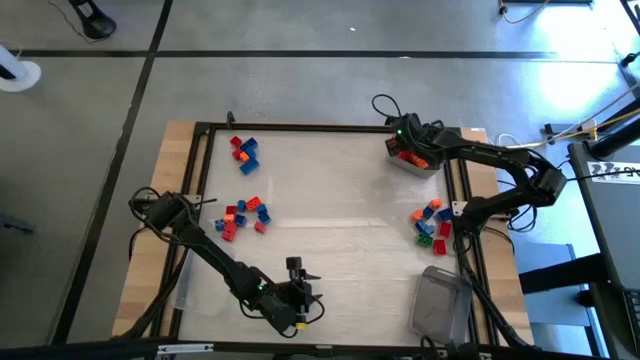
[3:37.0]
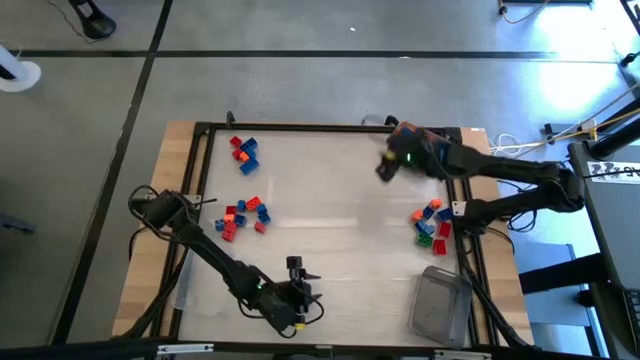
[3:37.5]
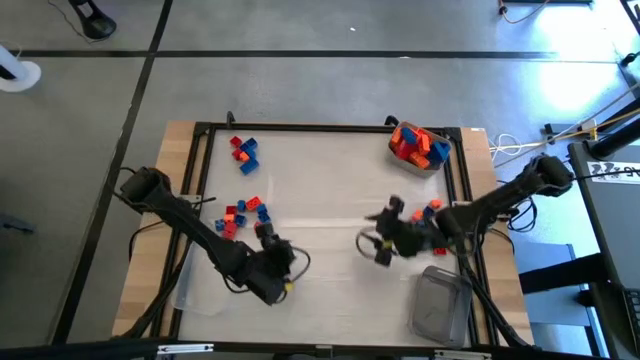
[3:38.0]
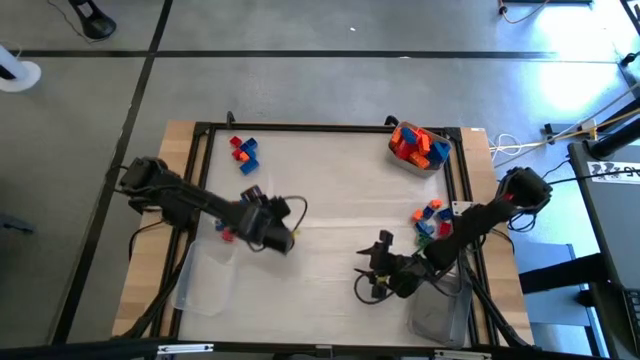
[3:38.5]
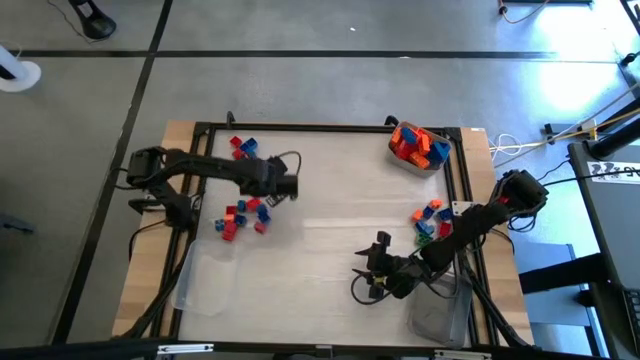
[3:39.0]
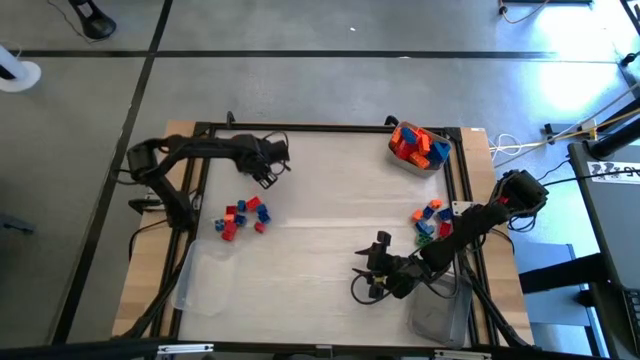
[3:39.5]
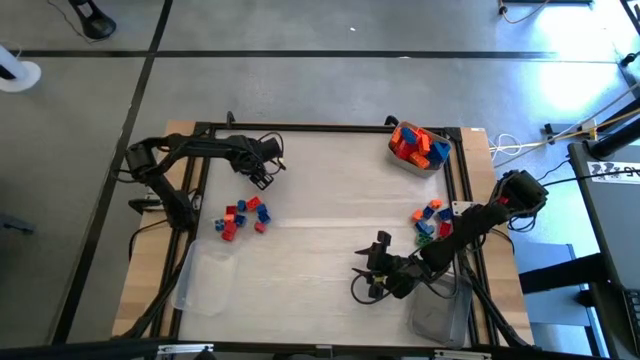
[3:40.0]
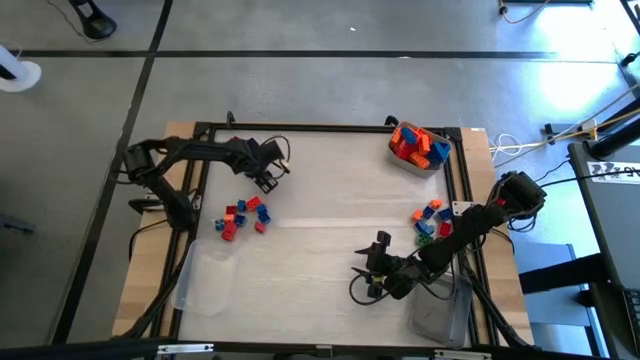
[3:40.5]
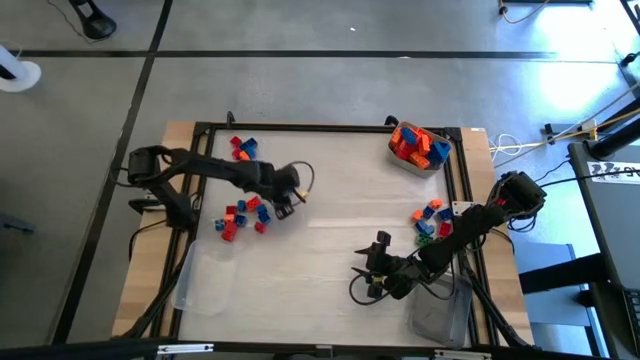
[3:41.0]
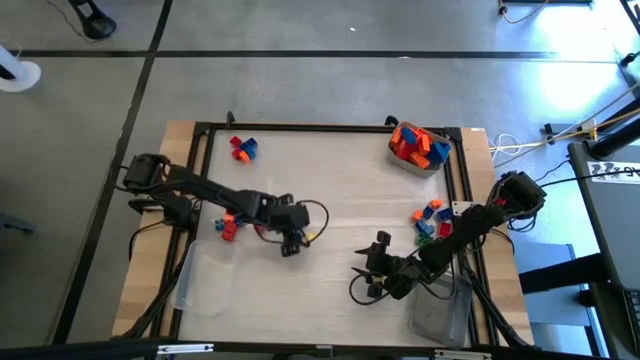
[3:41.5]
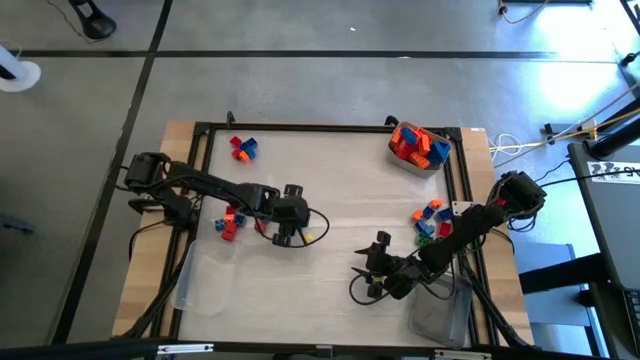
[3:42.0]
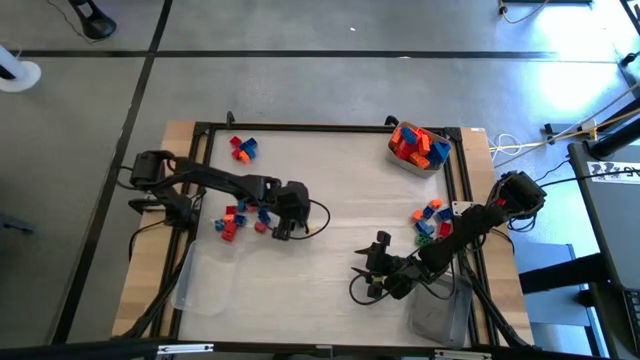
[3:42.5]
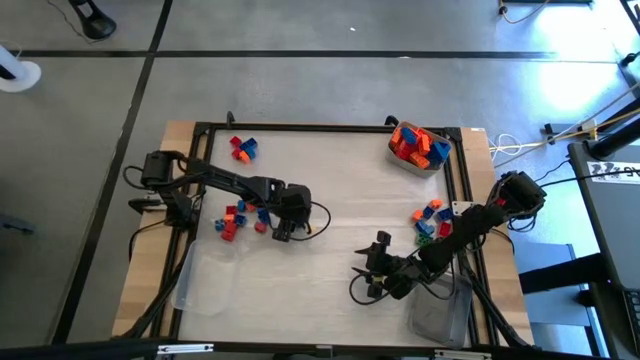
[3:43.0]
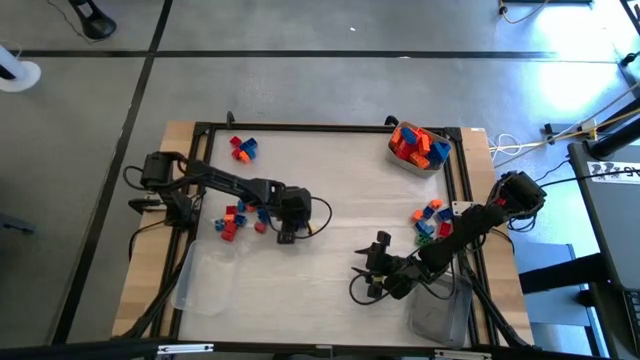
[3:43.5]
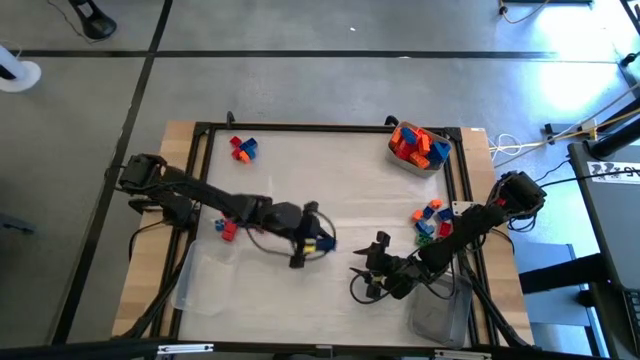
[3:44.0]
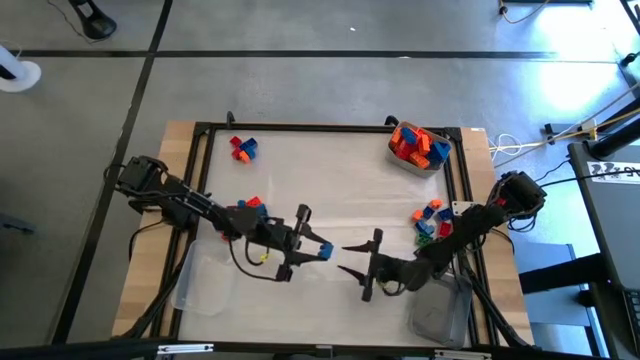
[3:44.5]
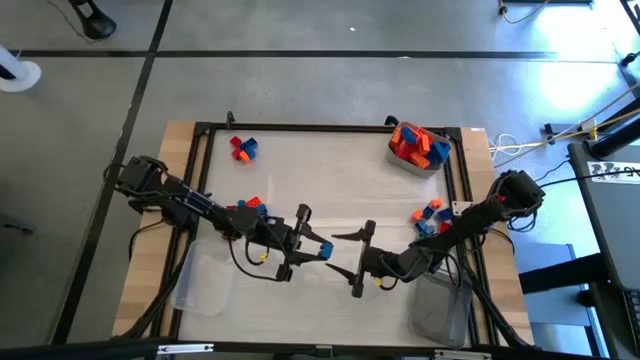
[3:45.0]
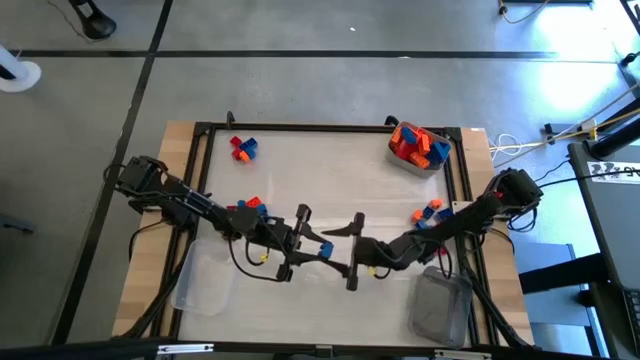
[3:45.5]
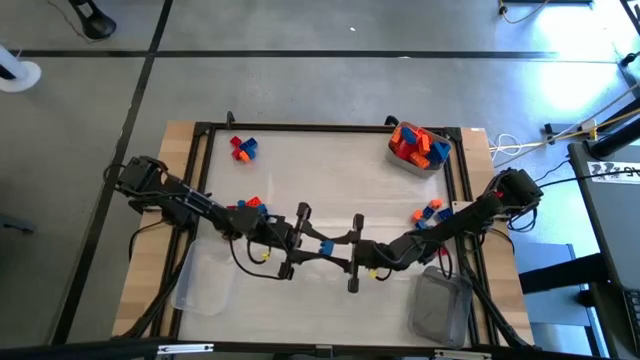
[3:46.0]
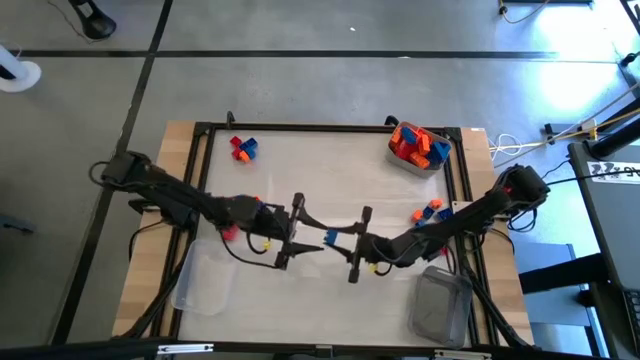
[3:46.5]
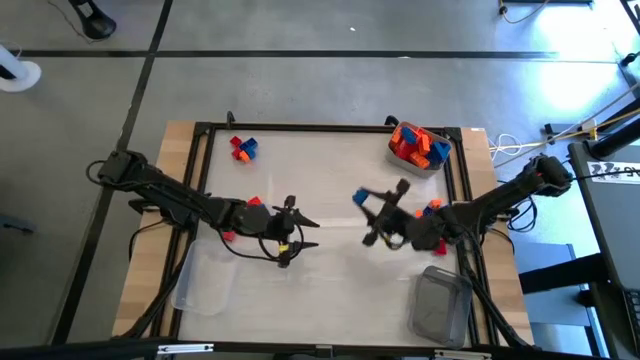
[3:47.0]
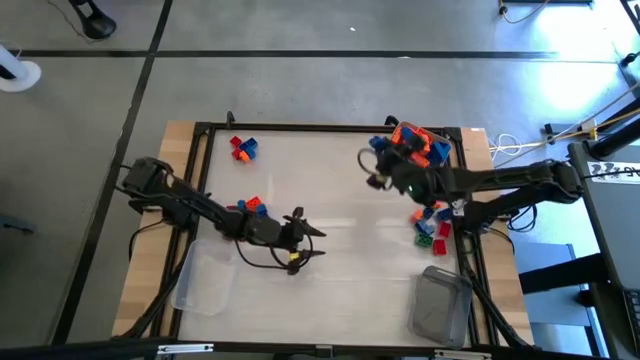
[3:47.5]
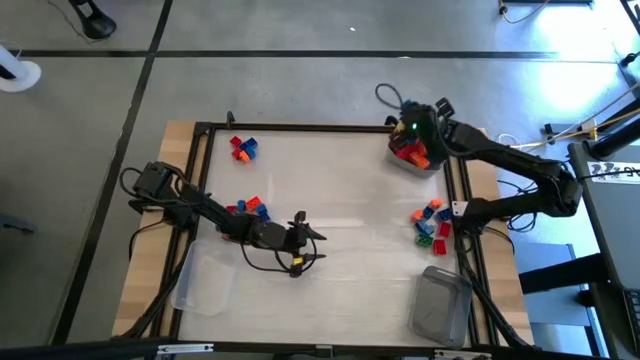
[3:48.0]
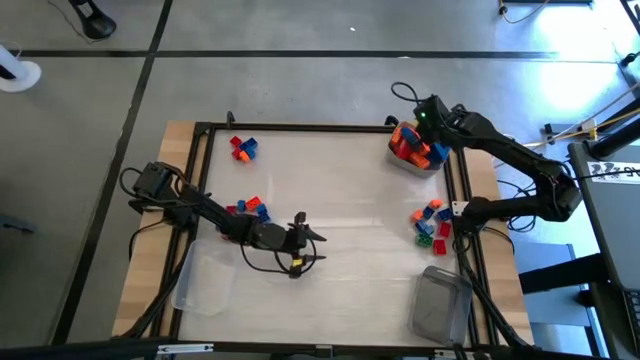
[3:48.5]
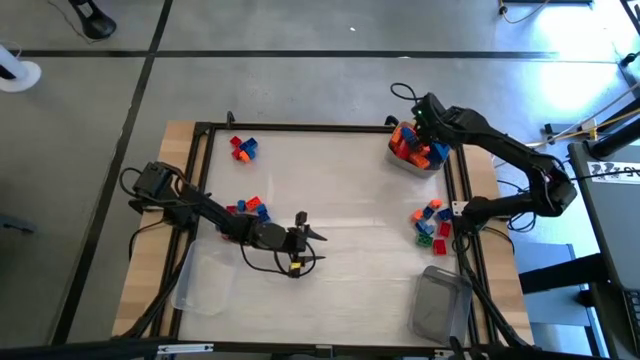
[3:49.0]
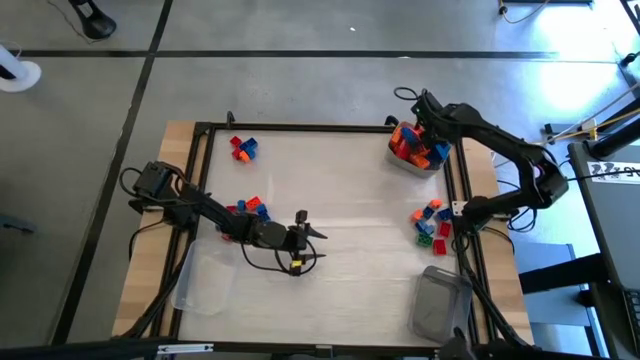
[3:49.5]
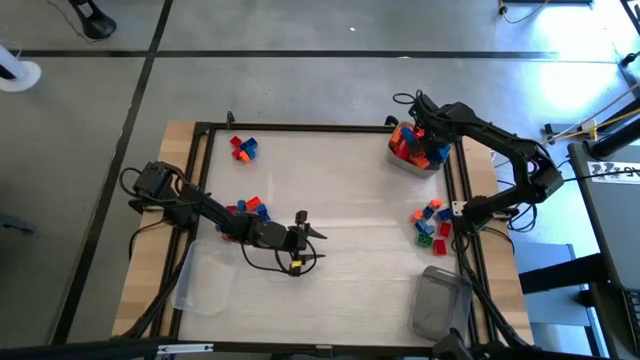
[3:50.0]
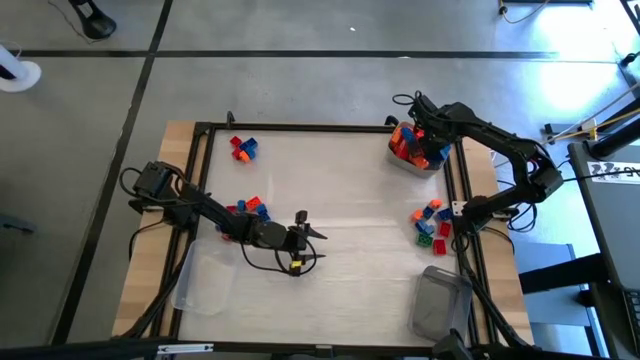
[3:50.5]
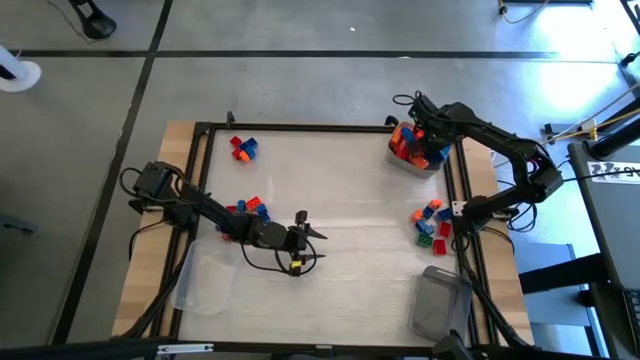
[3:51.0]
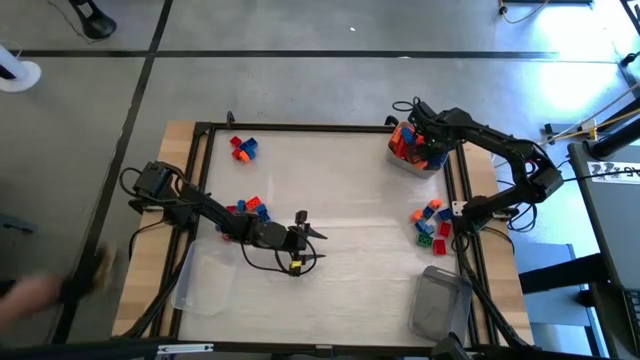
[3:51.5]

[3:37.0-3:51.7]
Task: Sort blocks by size
Put the blue game piece into the gray bin

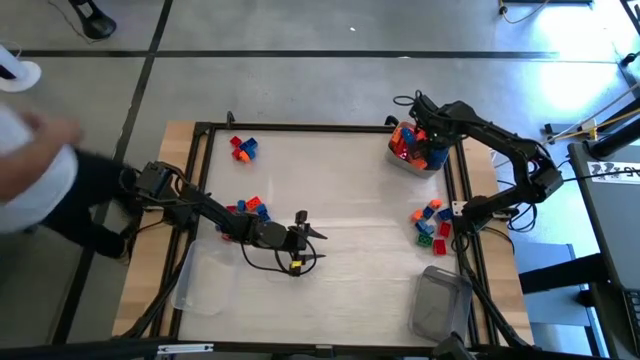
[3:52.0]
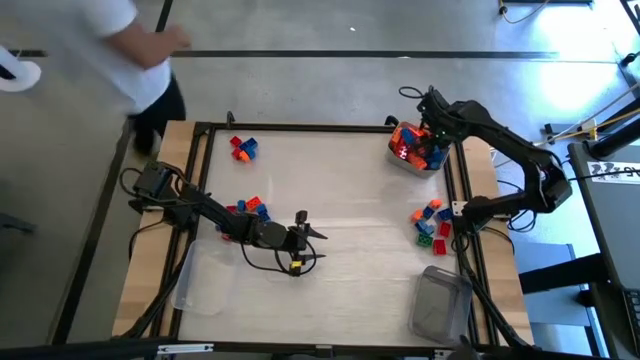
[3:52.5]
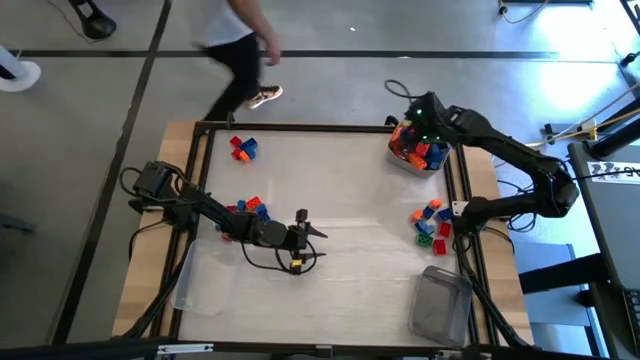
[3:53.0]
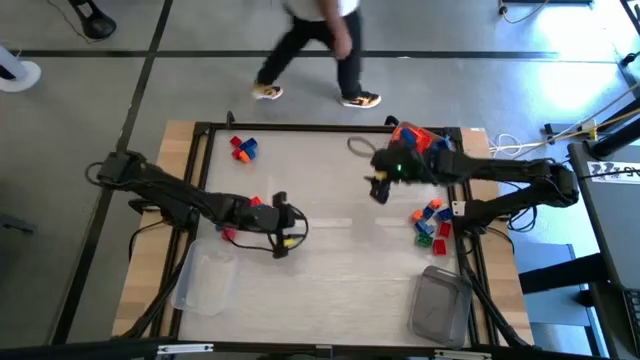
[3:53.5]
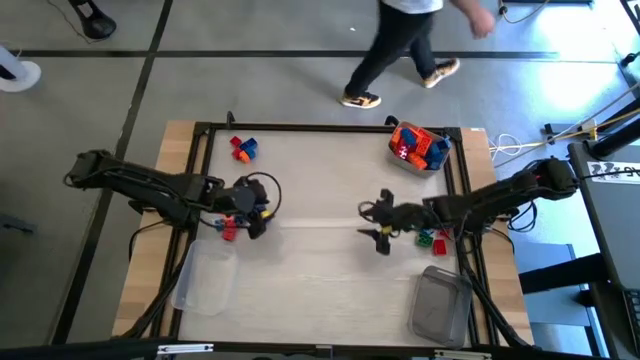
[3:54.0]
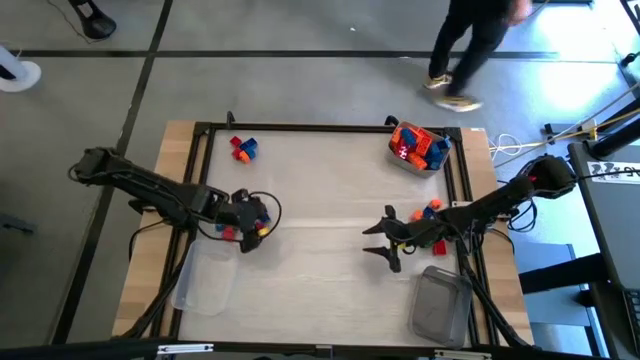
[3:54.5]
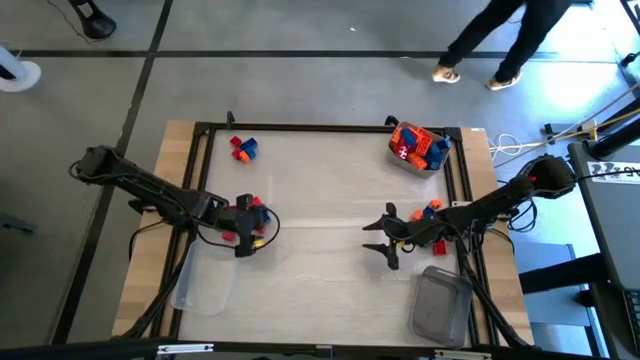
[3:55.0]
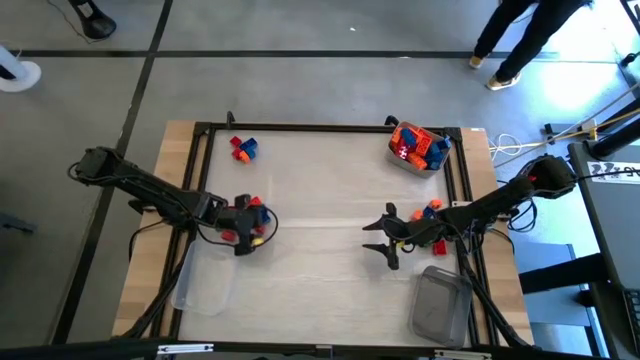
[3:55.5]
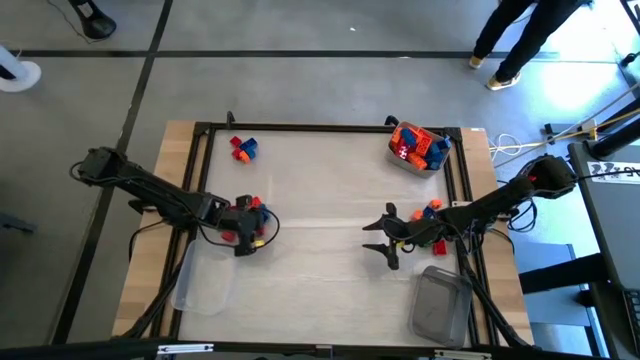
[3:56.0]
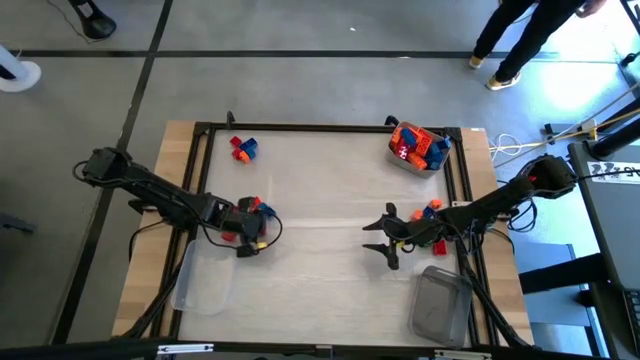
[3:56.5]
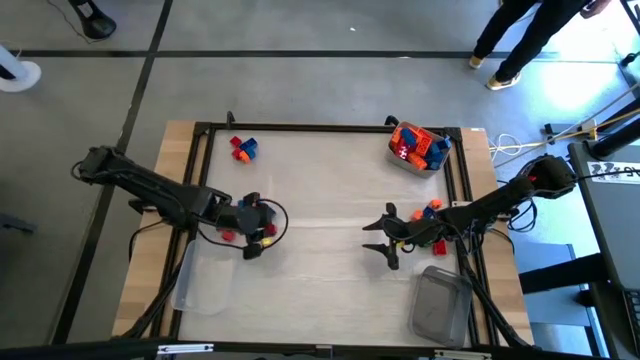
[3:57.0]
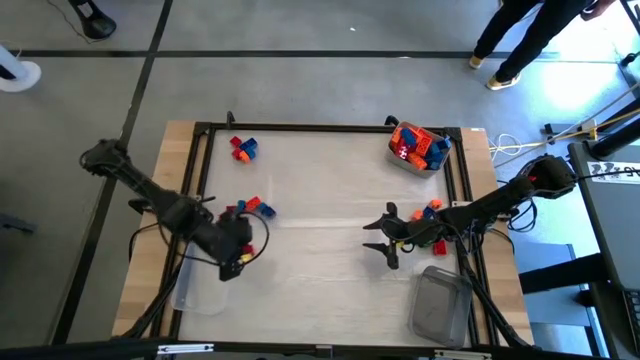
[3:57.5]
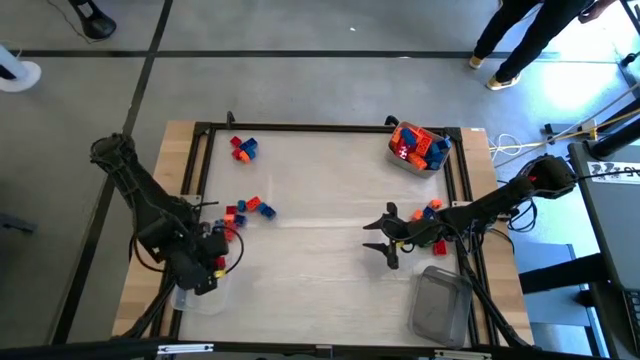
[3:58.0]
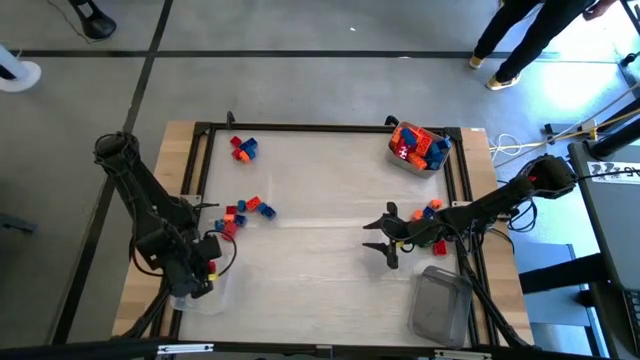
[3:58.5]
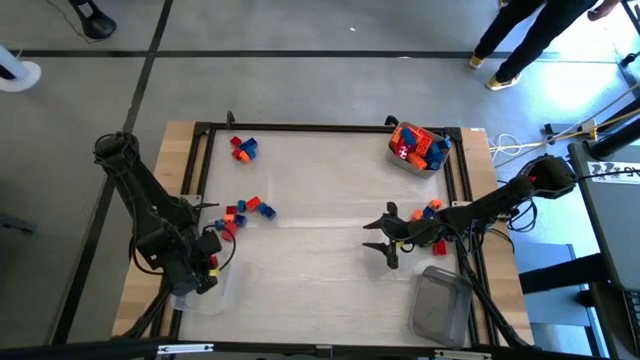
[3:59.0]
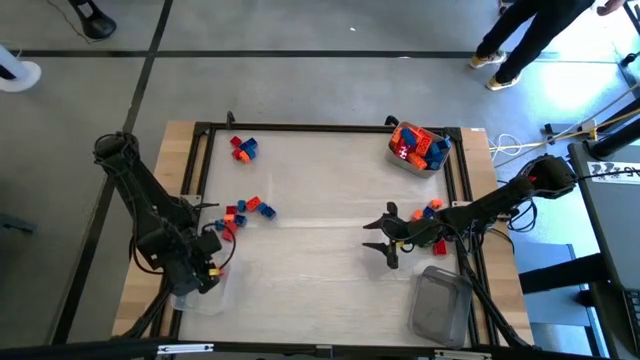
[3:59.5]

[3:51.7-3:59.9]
Put the red game piece into the transparent bin
